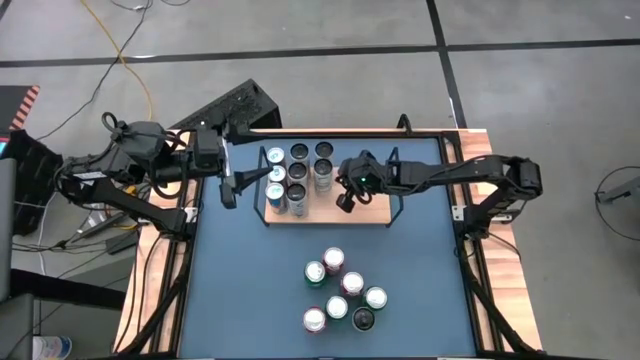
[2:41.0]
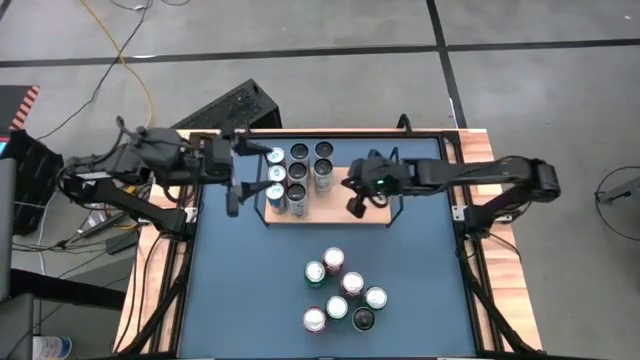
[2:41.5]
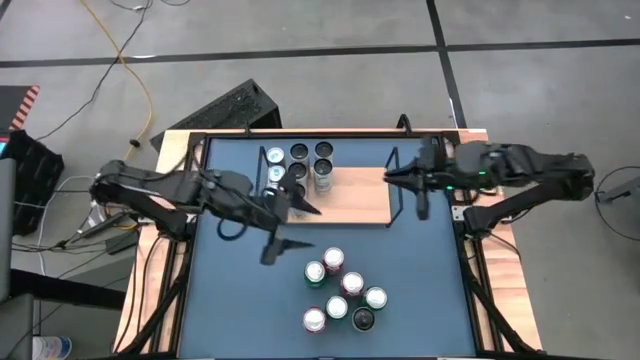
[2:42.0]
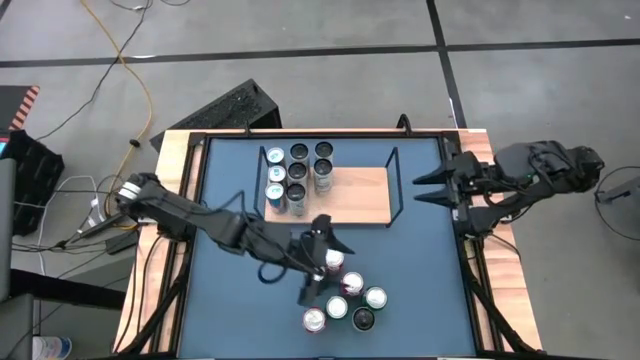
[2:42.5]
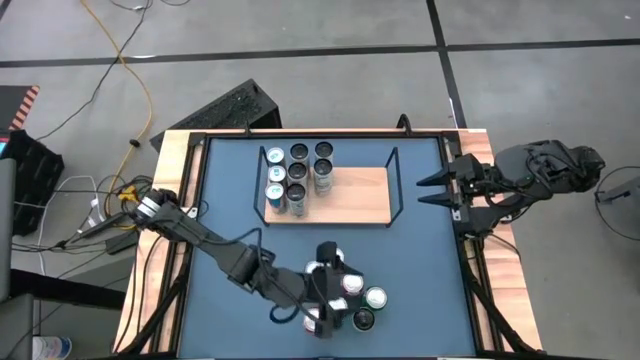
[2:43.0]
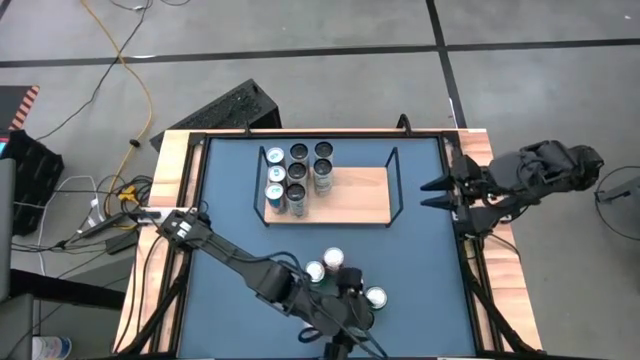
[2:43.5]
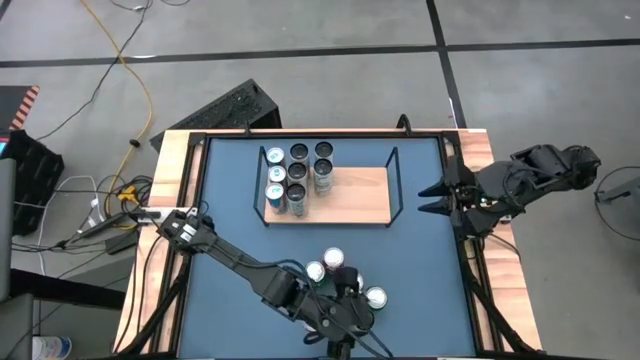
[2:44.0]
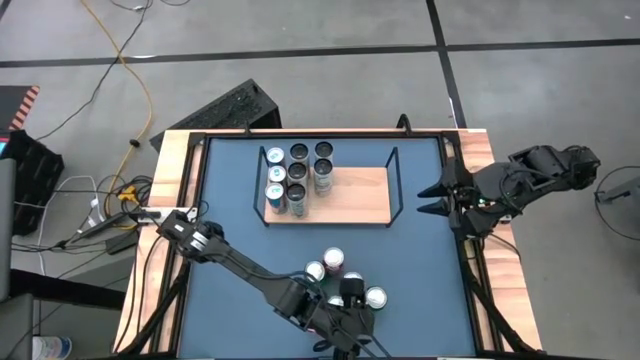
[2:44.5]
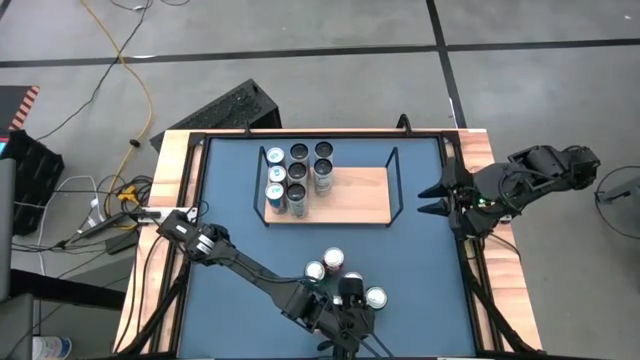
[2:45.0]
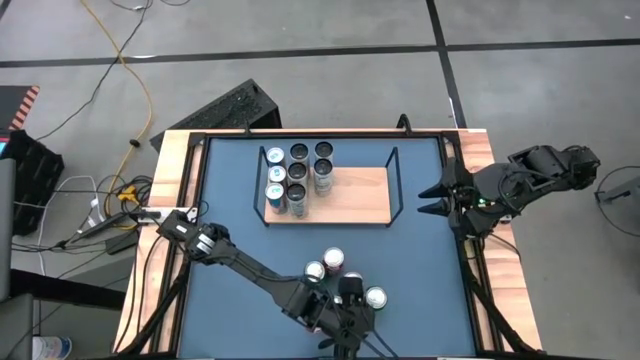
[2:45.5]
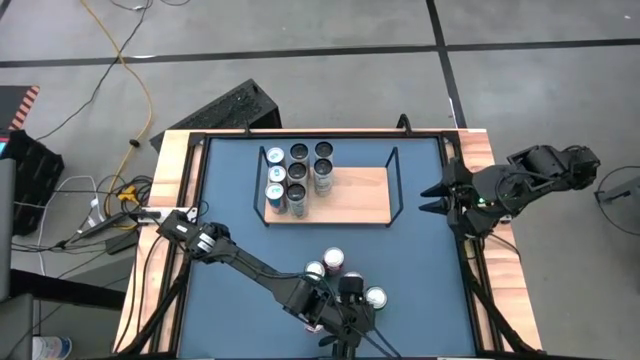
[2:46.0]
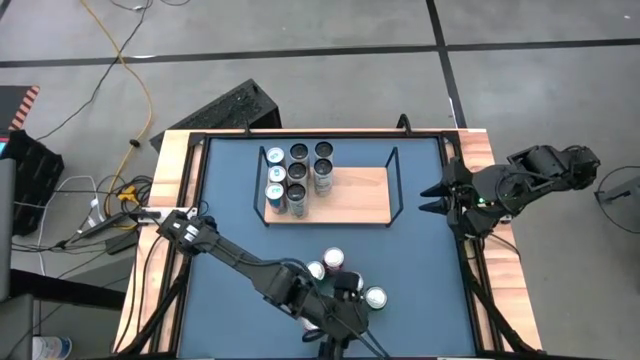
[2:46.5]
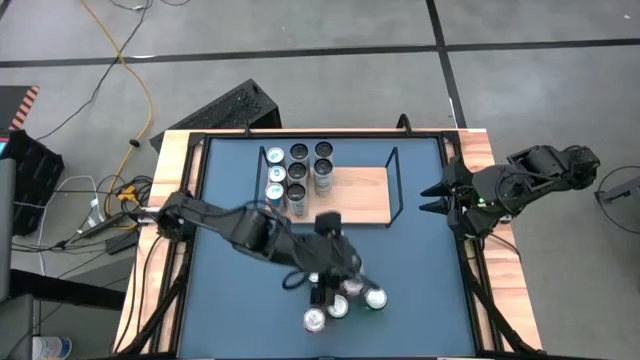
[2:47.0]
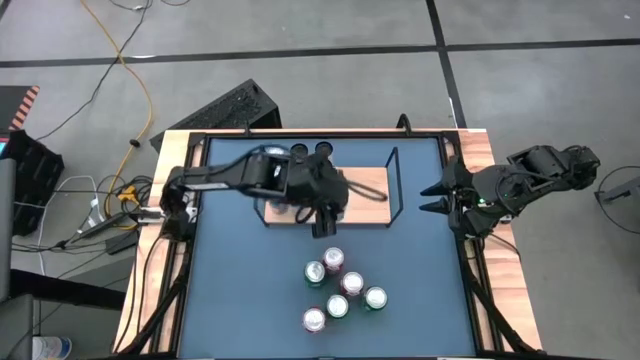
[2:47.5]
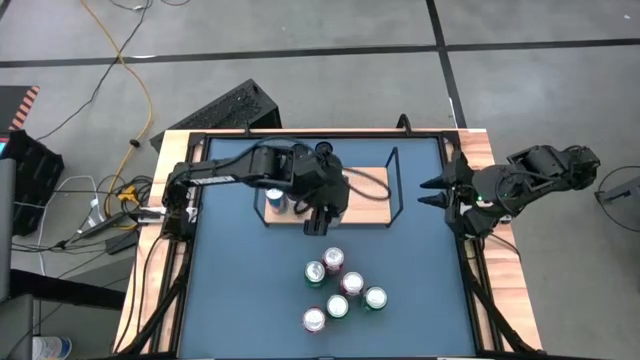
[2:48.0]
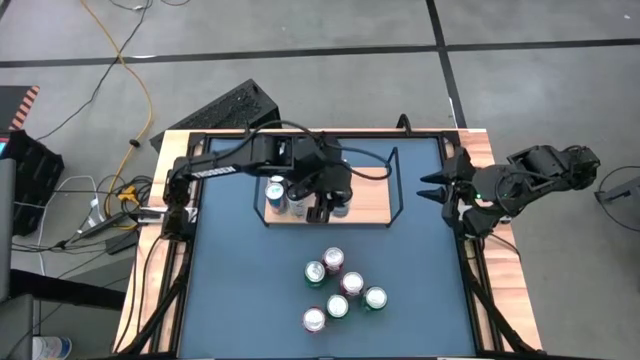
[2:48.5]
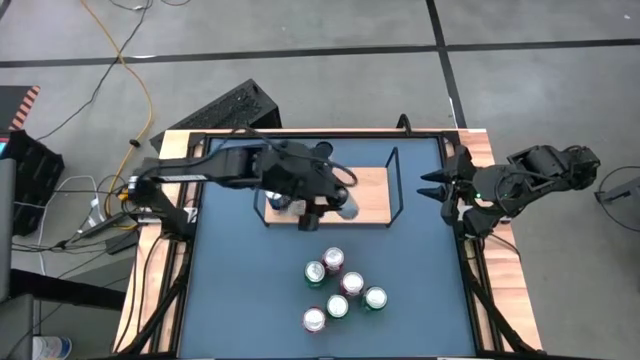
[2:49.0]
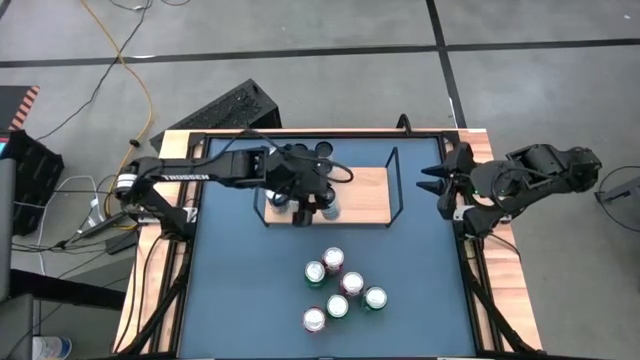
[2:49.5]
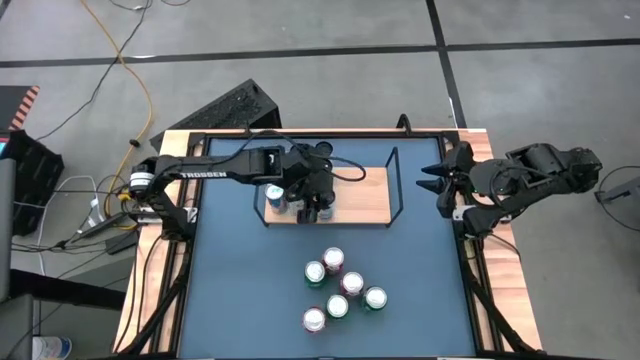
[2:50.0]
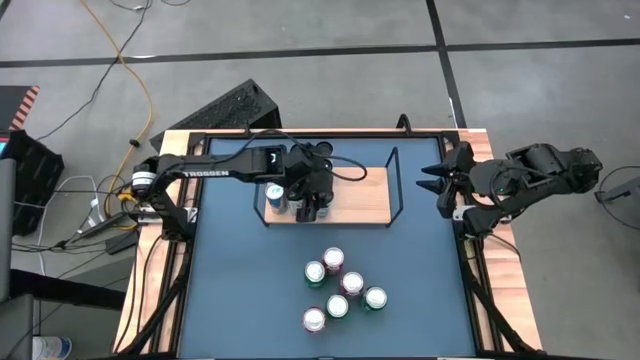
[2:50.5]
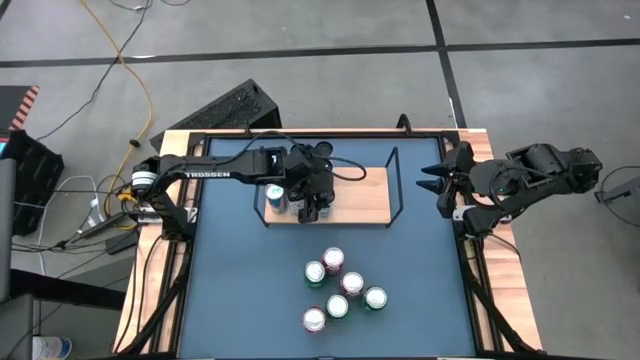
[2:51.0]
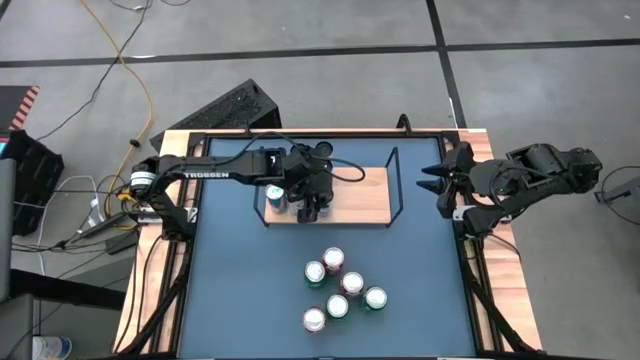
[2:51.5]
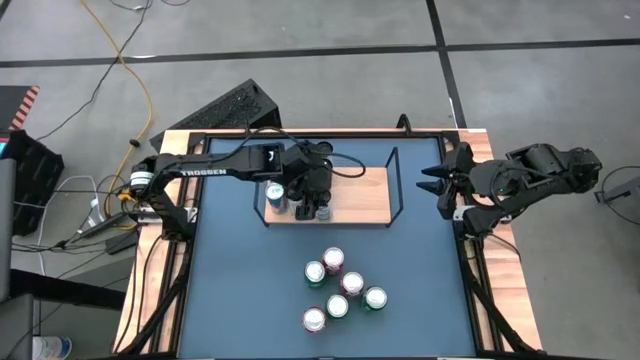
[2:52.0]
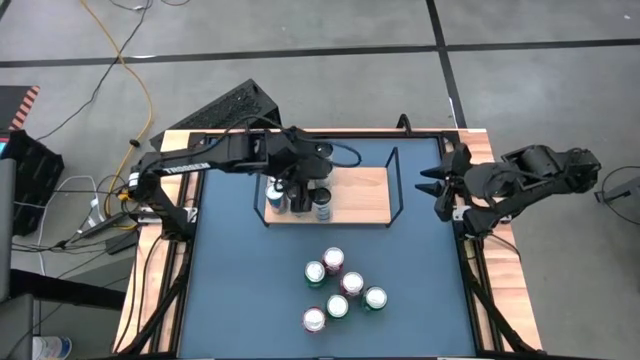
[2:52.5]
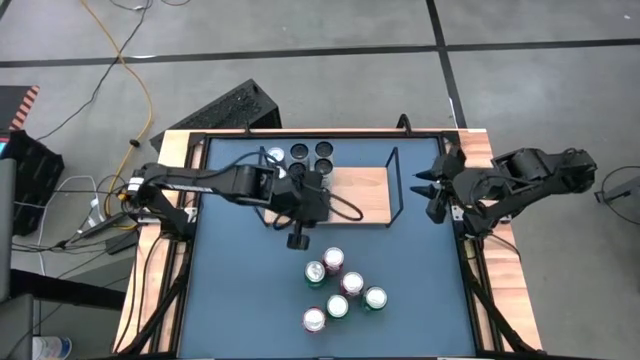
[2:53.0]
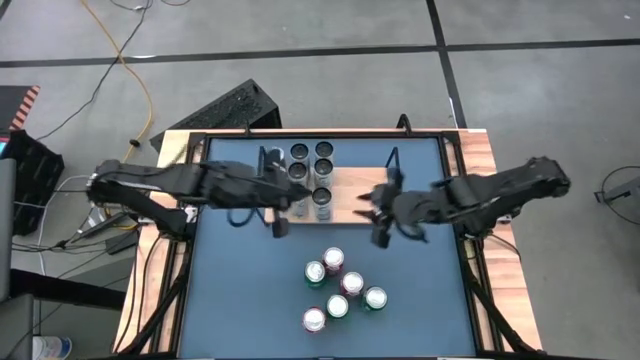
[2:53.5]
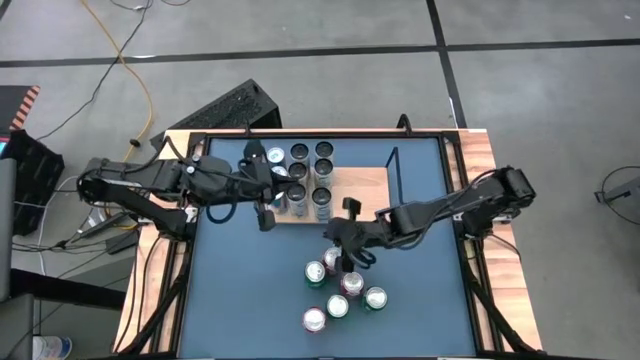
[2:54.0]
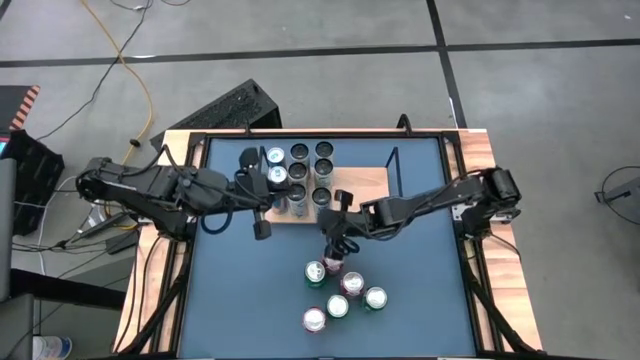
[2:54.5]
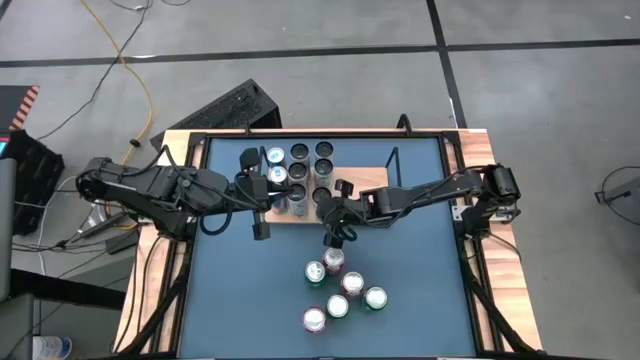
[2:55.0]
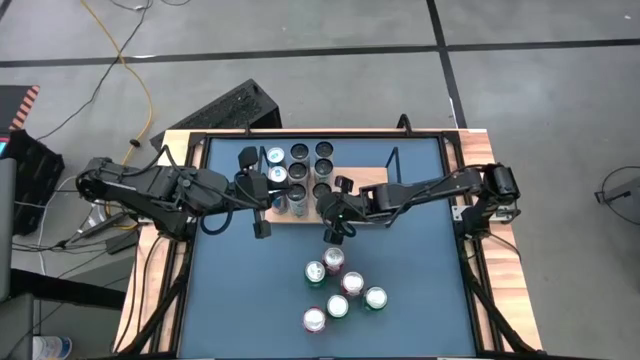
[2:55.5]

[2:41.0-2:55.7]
Task: Place canned beverage on shelf
Put the white and blue soda can on the shelf aligned with the other white and blue soda cans
